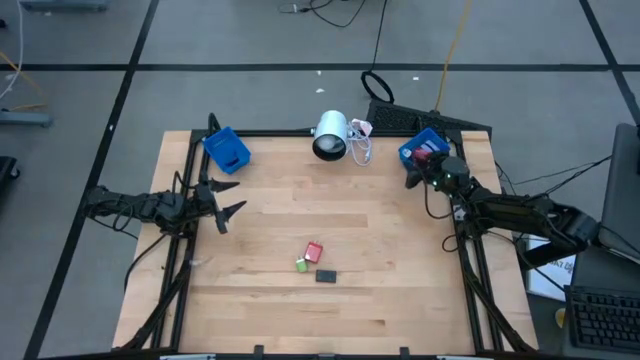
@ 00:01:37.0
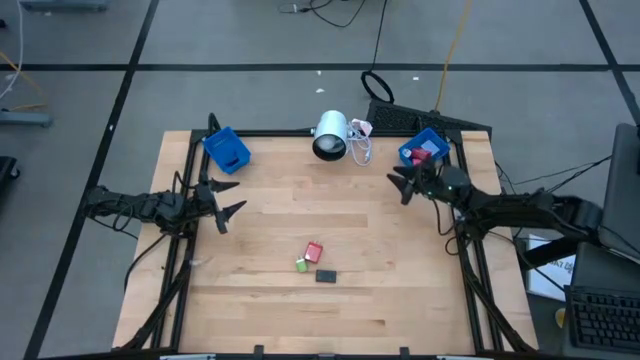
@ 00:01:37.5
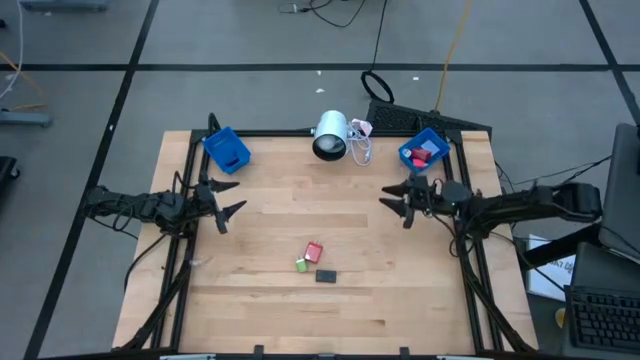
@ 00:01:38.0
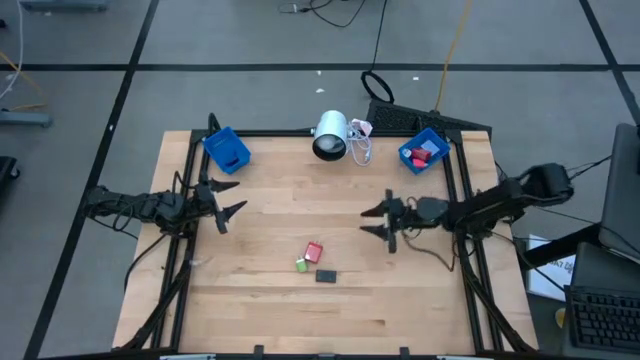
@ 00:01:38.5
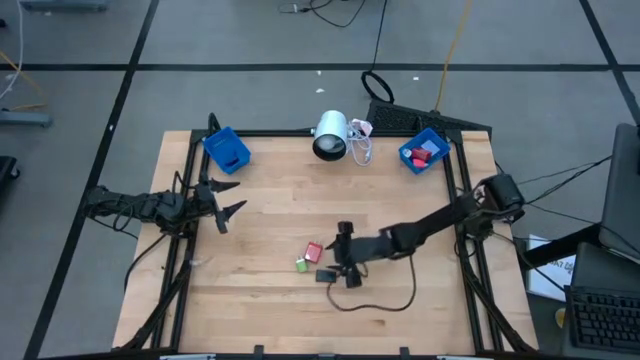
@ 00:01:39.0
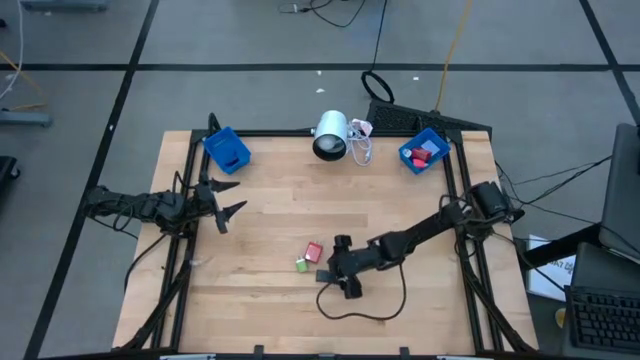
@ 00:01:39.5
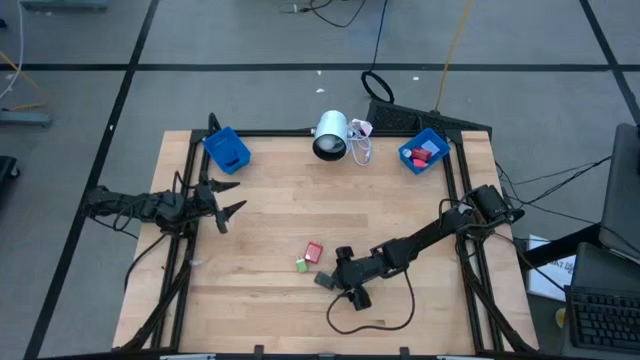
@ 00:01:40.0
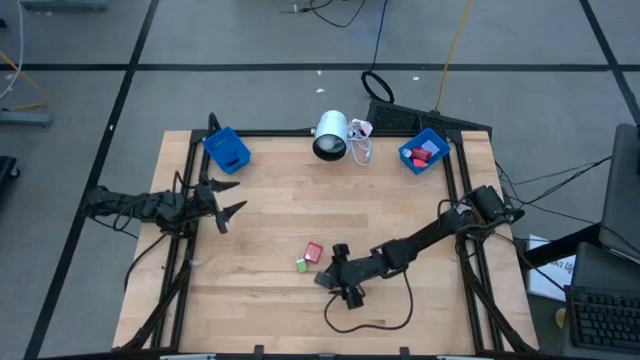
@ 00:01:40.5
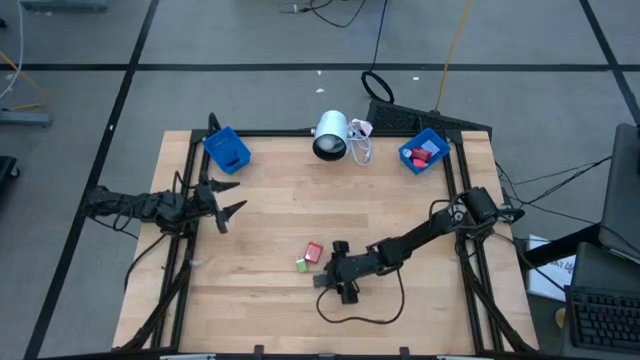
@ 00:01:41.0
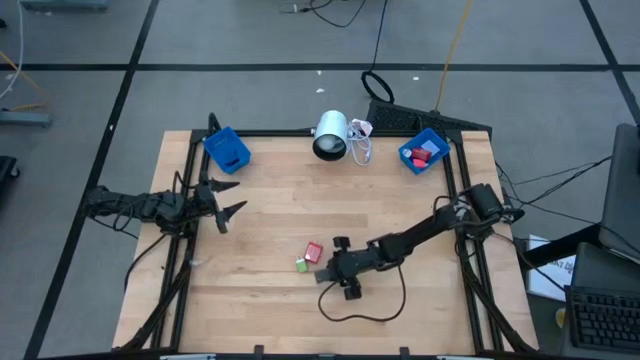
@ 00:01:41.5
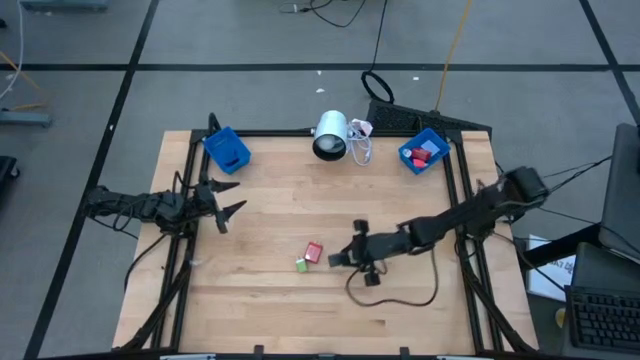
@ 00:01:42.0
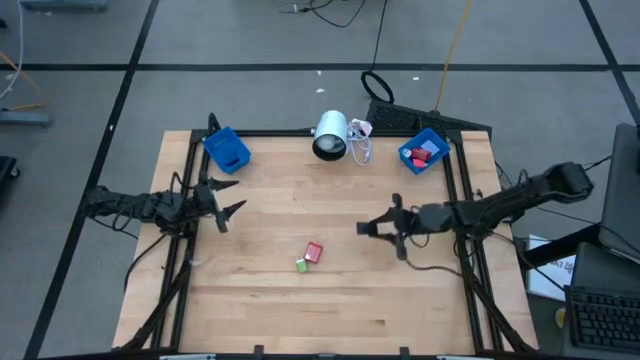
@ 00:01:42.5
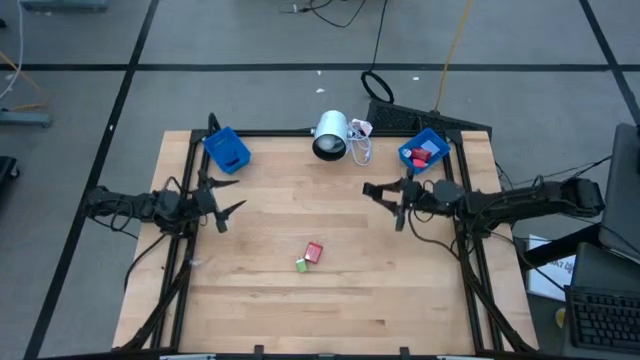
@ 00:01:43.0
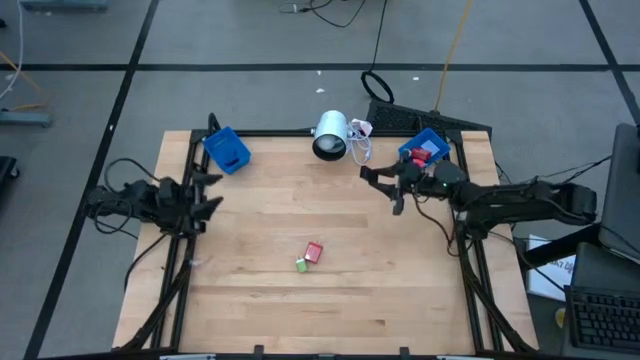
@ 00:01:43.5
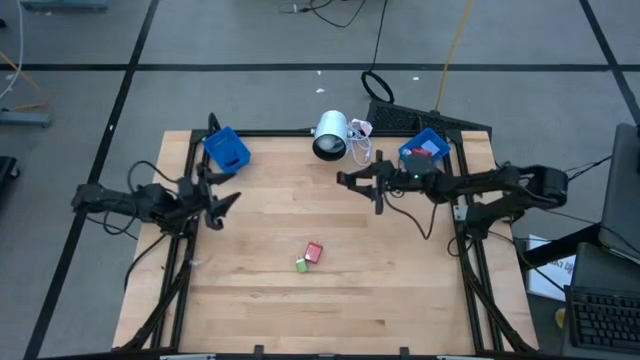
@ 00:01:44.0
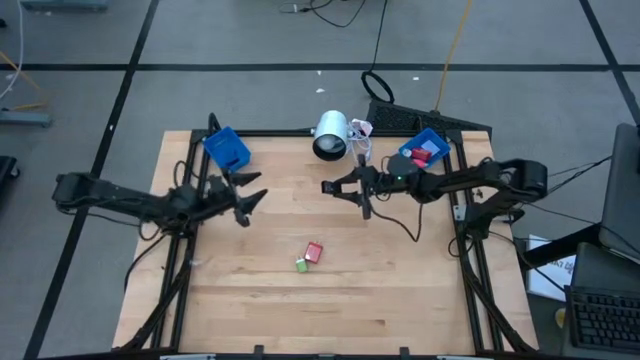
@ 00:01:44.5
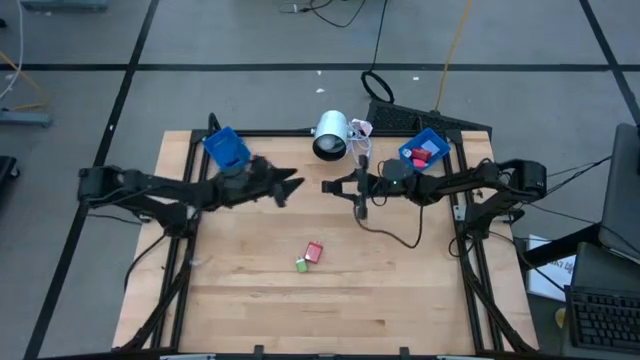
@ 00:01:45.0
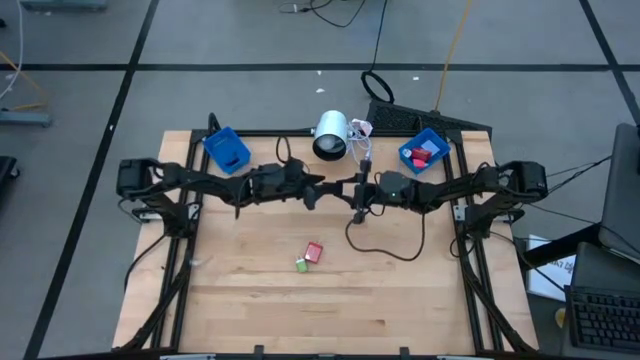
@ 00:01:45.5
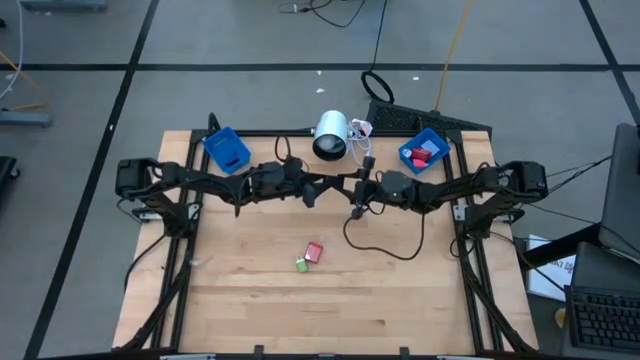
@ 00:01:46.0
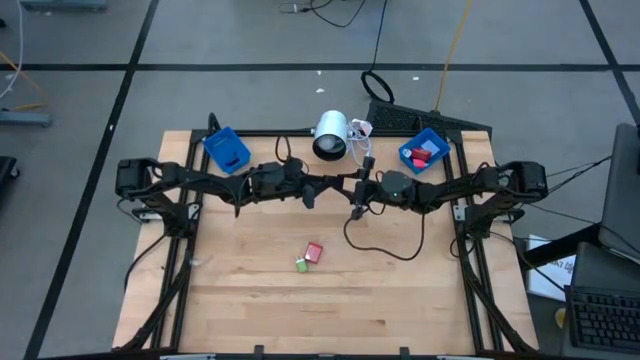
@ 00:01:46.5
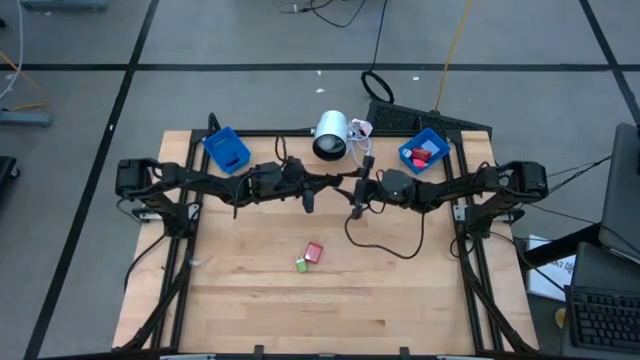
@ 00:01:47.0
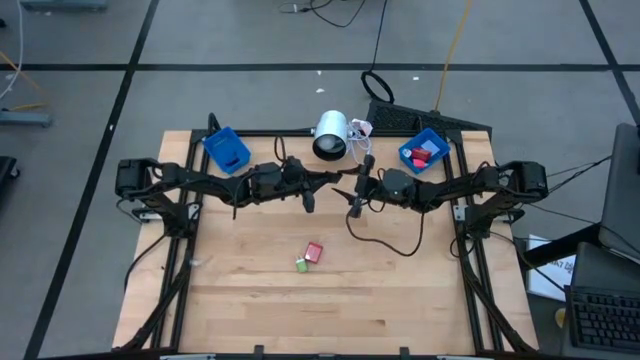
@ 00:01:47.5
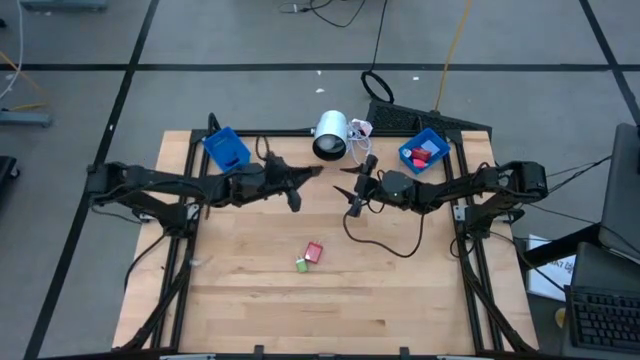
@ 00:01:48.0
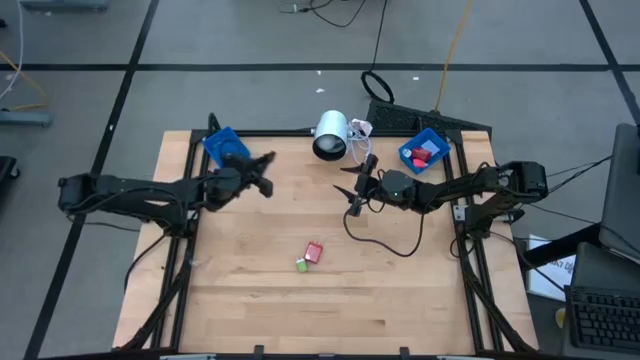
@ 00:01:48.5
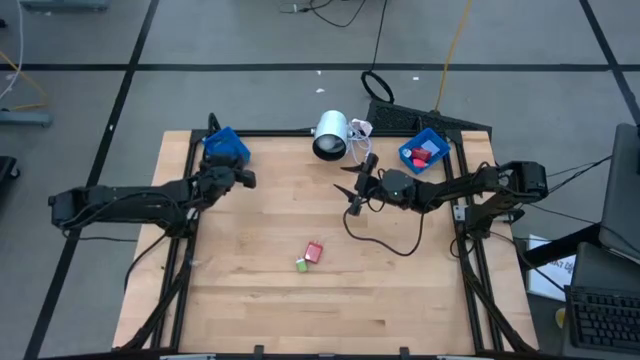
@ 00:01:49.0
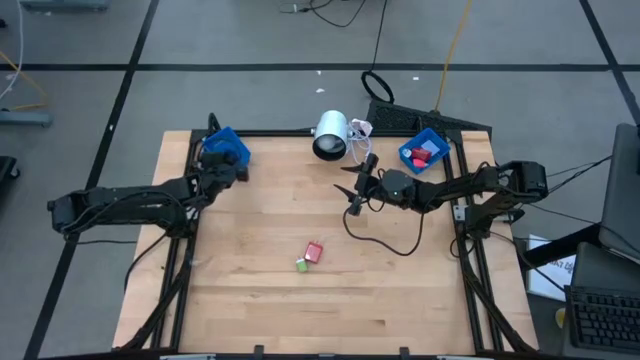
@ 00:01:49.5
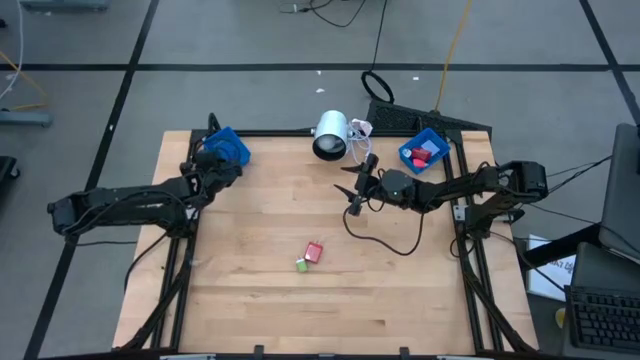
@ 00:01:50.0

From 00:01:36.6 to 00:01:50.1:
Task: Pick & Place Office items
Put the black digital timer into the left blue bin

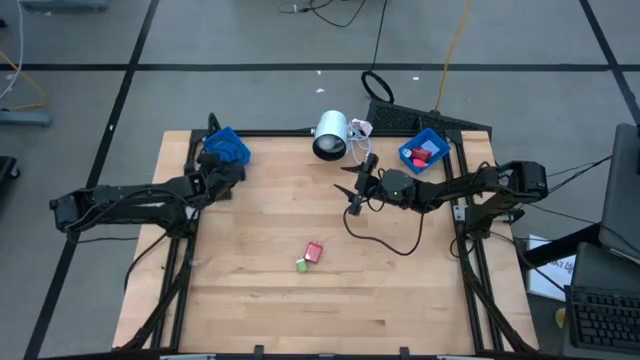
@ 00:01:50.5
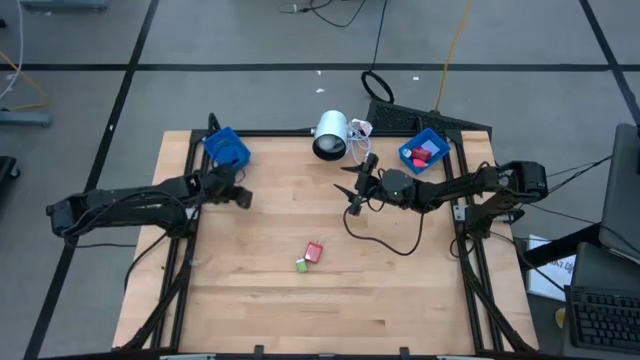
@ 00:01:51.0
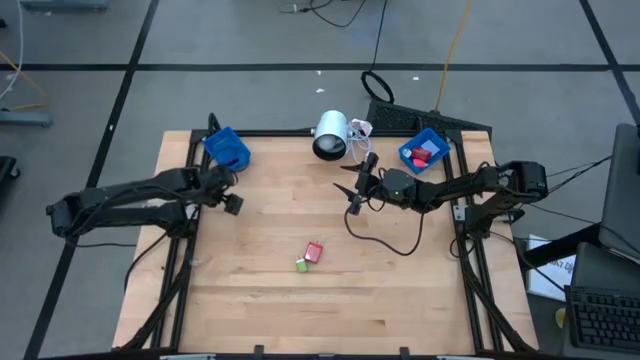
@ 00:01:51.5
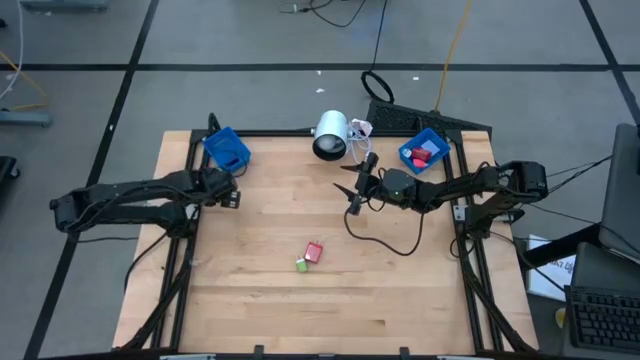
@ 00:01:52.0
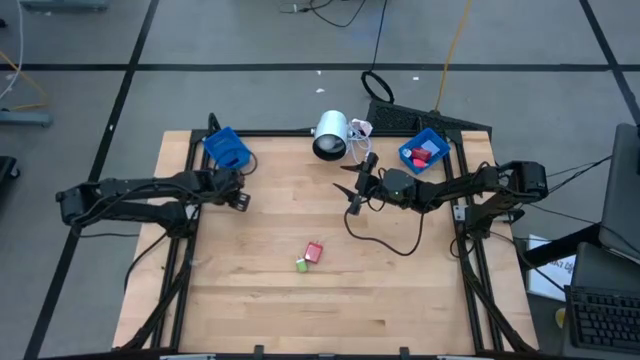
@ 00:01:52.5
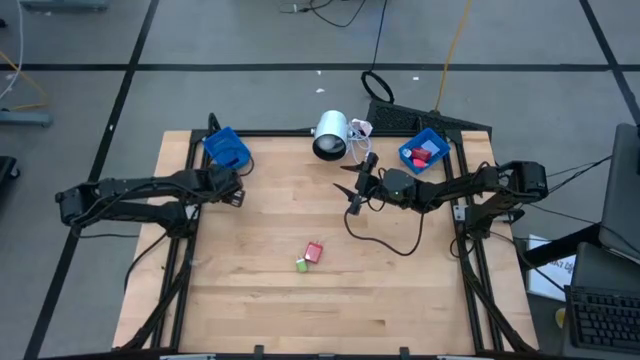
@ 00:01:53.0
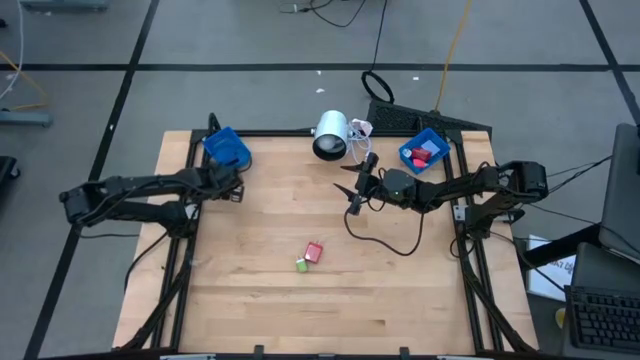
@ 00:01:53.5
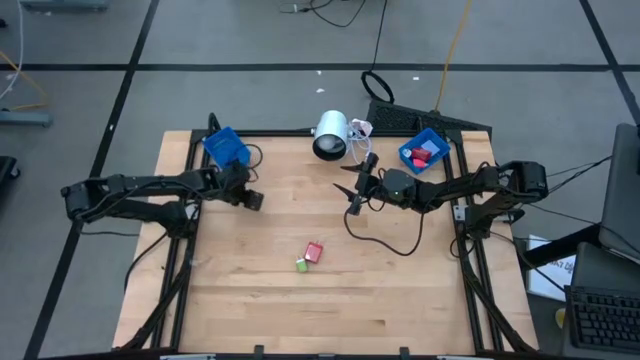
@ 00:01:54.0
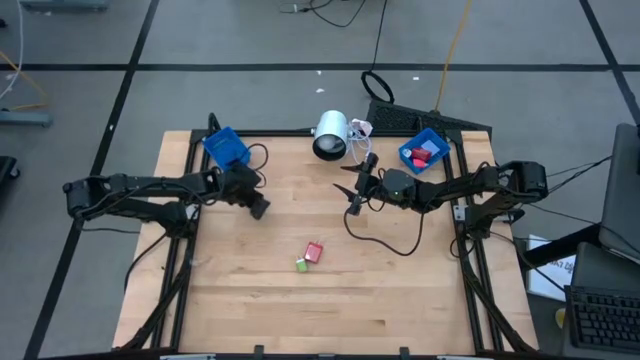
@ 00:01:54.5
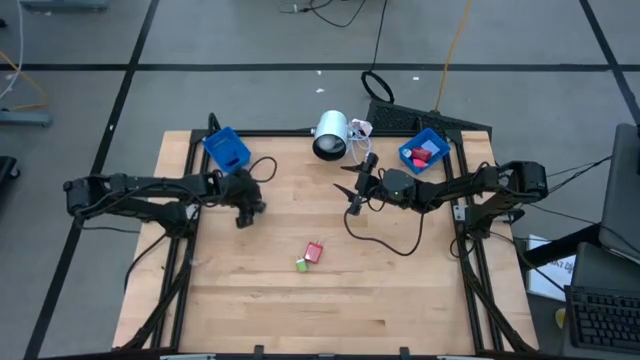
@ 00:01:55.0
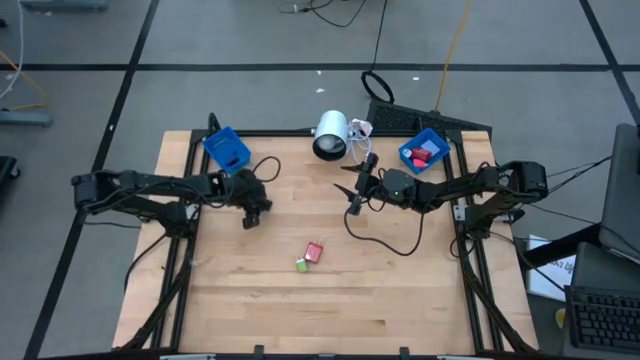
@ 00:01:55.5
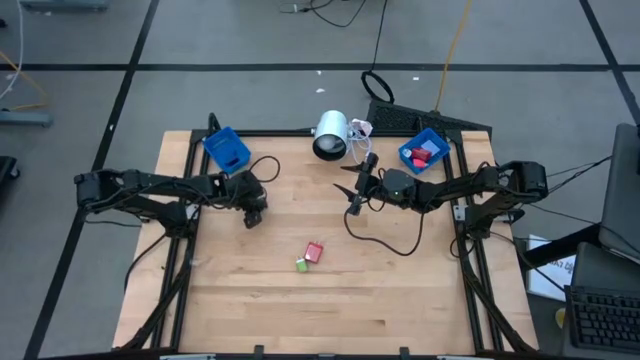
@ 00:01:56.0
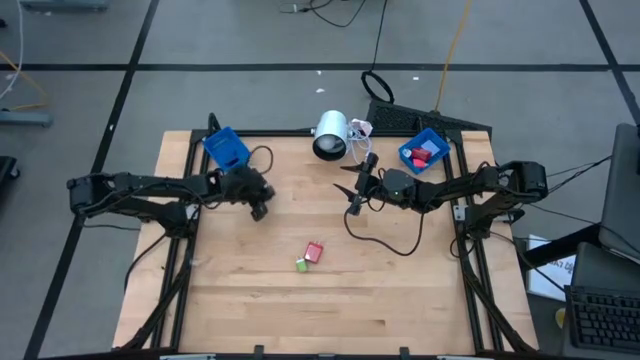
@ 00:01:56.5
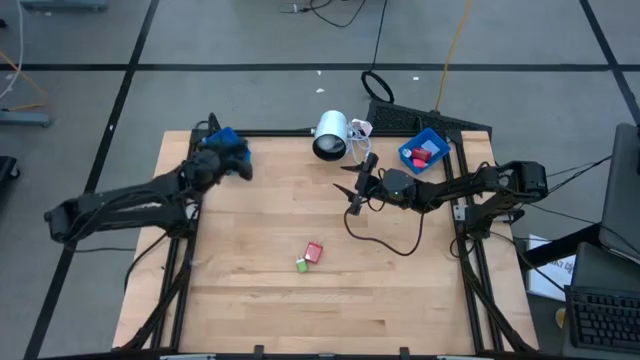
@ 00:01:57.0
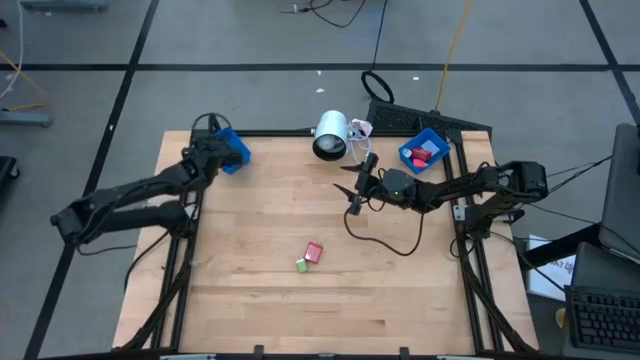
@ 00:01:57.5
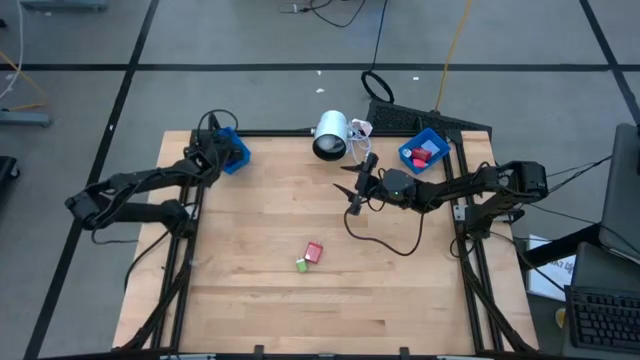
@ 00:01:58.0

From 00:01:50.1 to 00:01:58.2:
Put the black digital timer into the left blue bin
